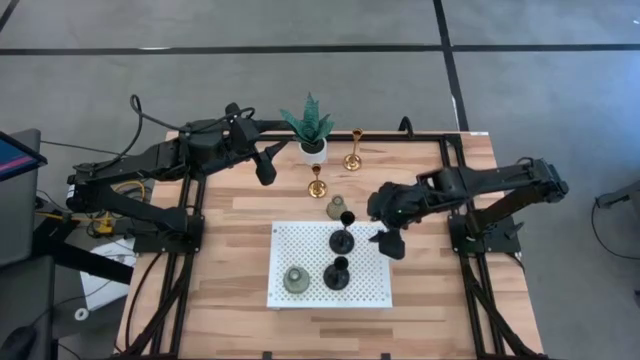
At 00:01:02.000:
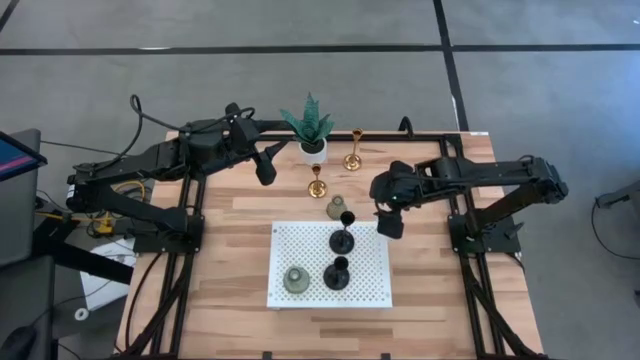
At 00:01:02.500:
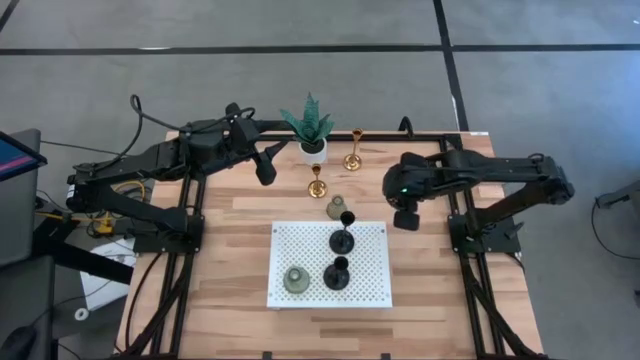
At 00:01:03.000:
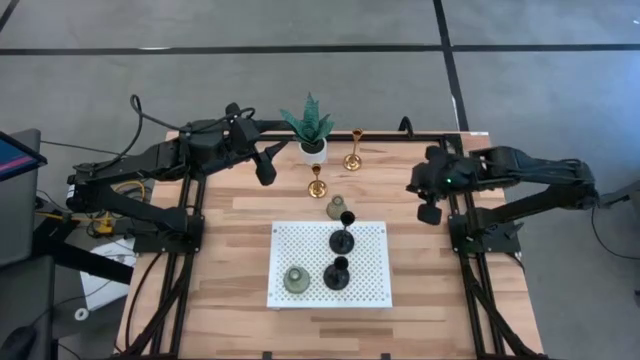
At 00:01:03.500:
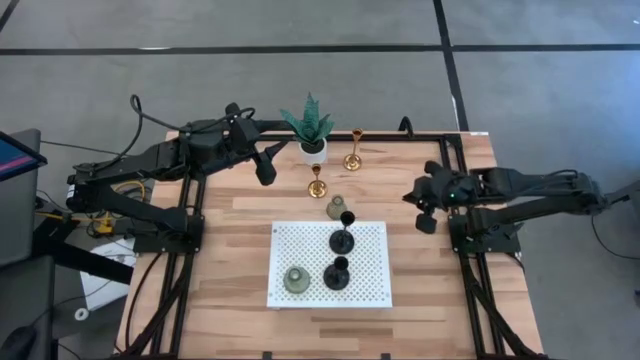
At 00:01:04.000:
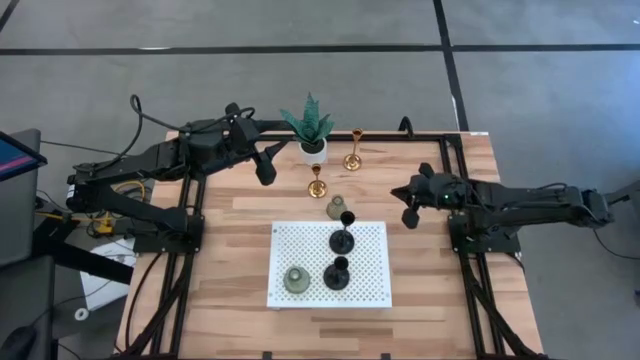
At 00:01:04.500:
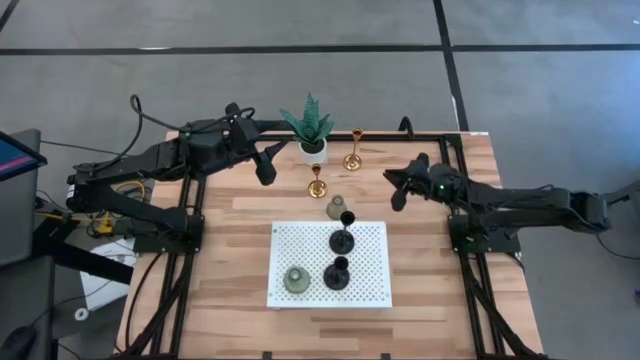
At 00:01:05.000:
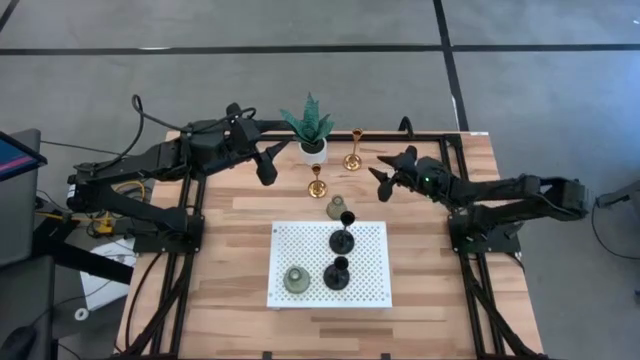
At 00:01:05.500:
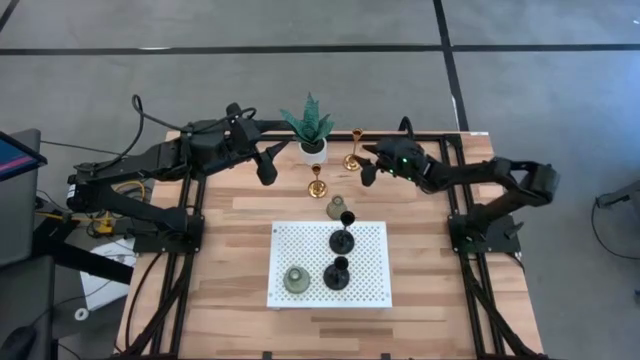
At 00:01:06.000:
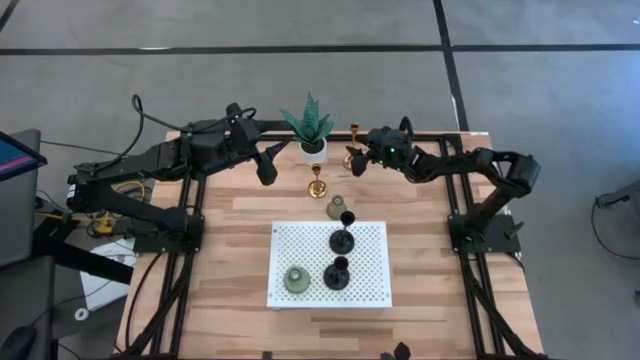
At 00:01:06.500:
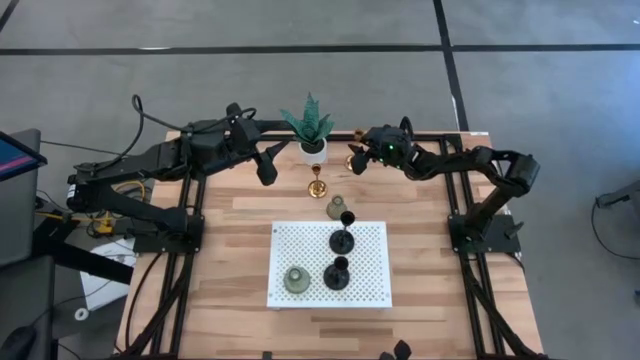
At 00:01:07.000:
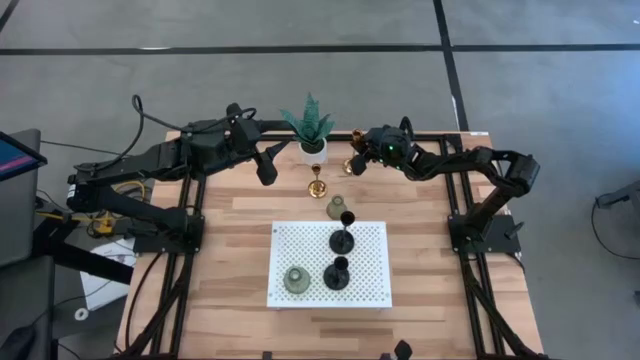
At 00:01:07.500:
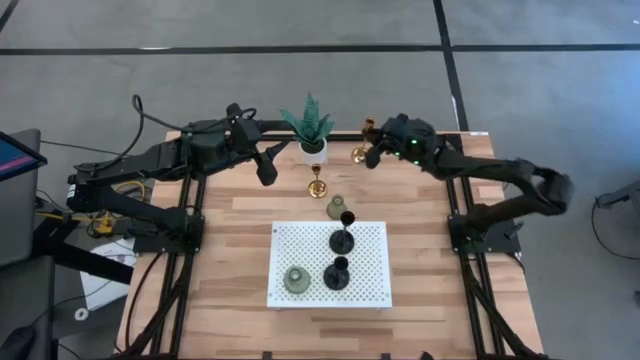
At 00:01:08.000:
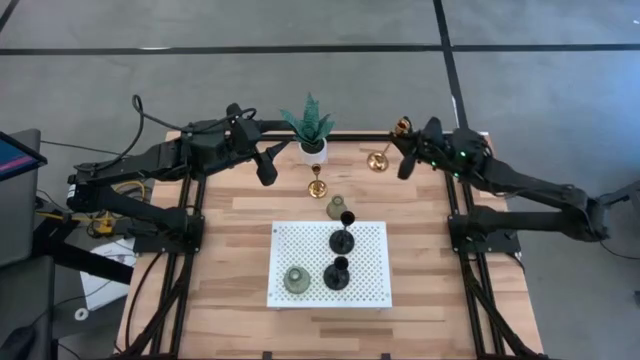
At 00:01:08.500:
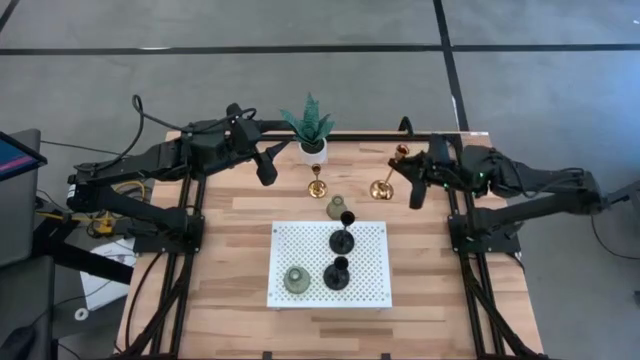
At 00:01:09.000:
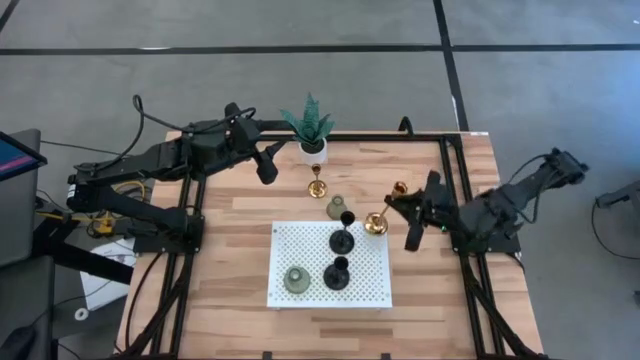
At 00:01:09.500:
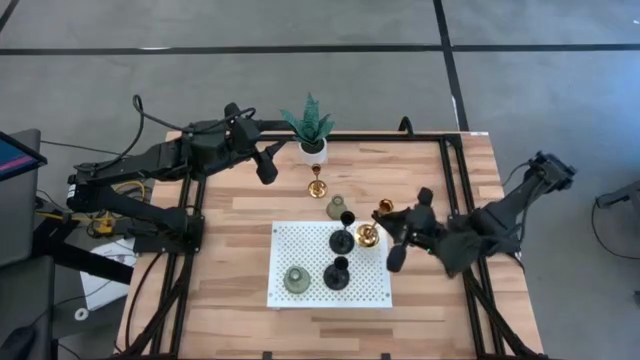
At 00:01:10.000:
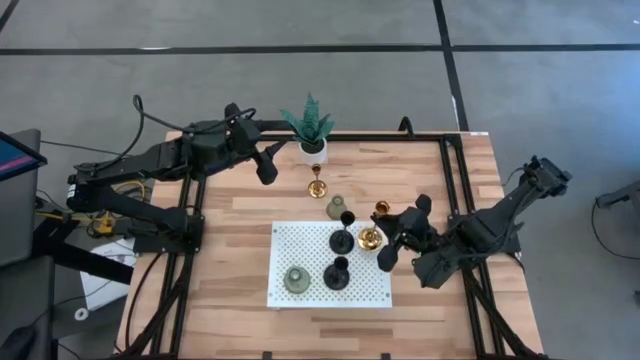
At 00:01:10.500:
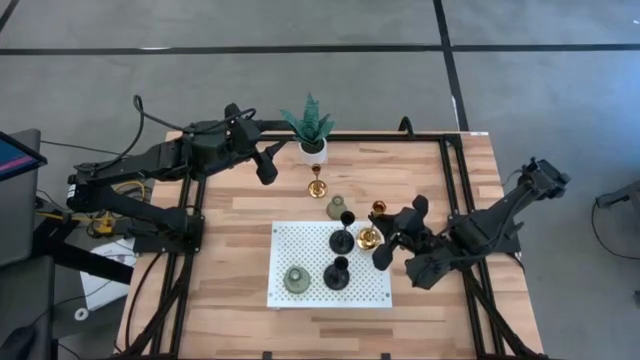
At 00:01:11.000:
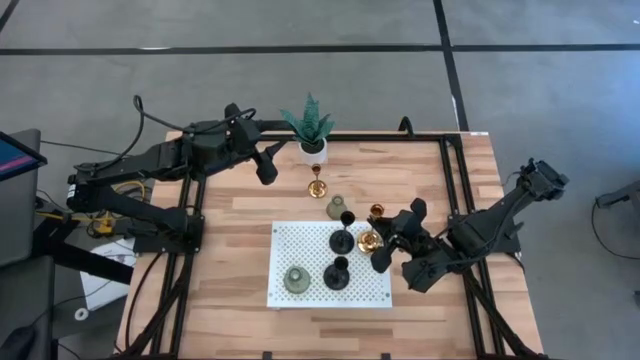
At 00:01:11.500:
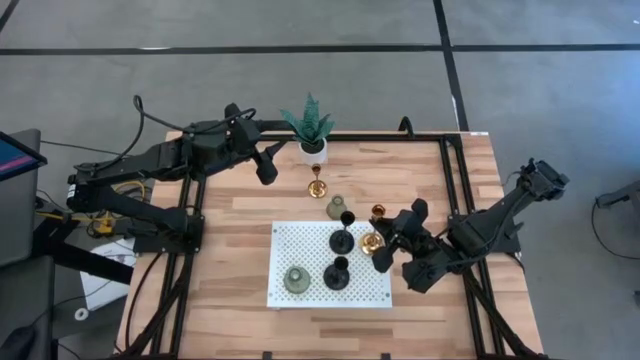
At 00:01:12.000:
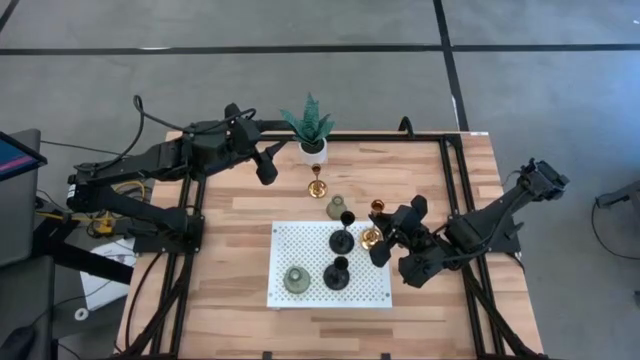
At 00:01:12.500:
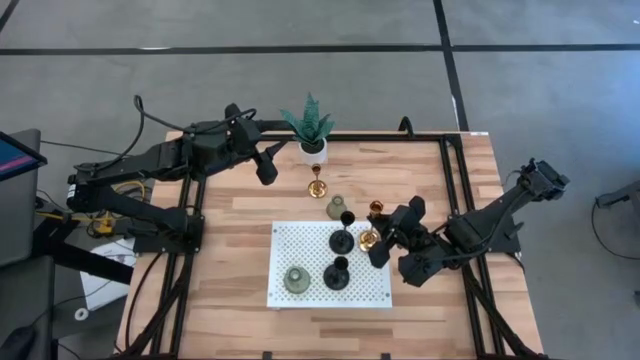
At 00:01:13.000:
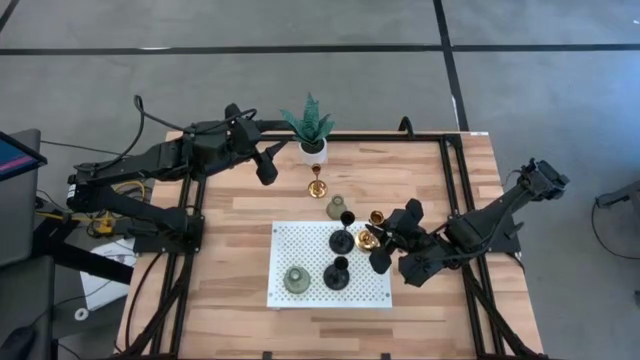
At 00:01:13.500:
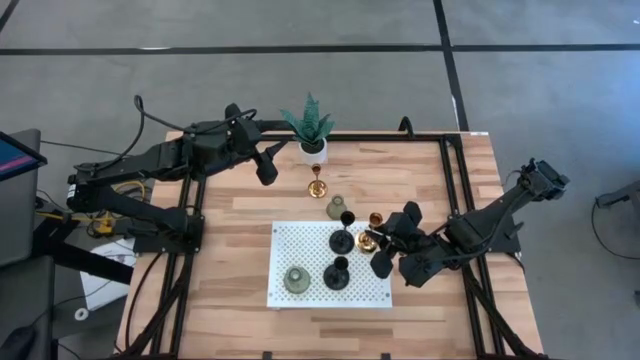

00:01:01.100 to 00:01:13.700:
Task: Pick & Place candle stick holders
Put the top gold candle holder on the shelf

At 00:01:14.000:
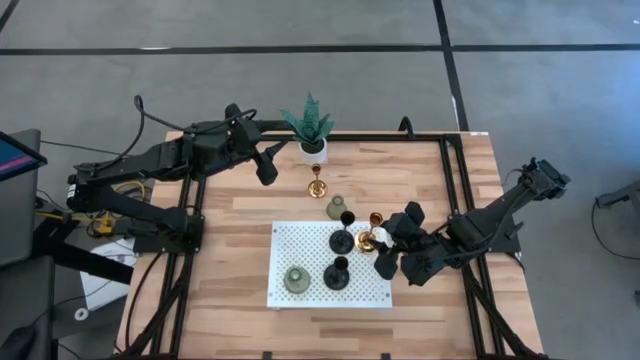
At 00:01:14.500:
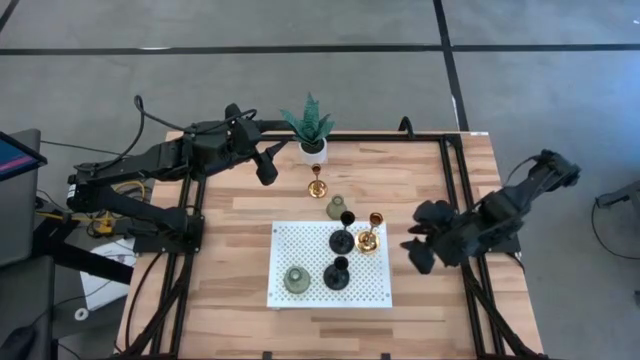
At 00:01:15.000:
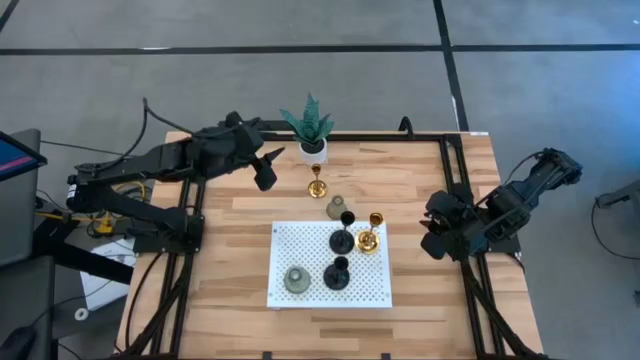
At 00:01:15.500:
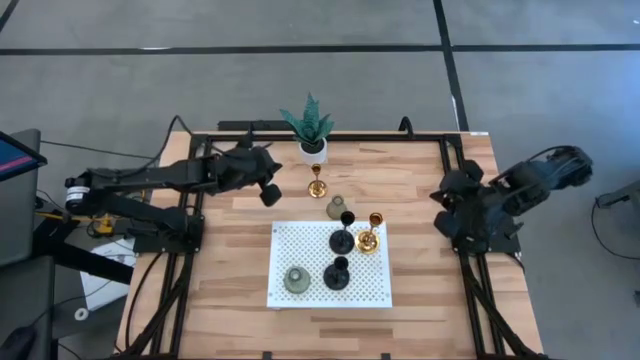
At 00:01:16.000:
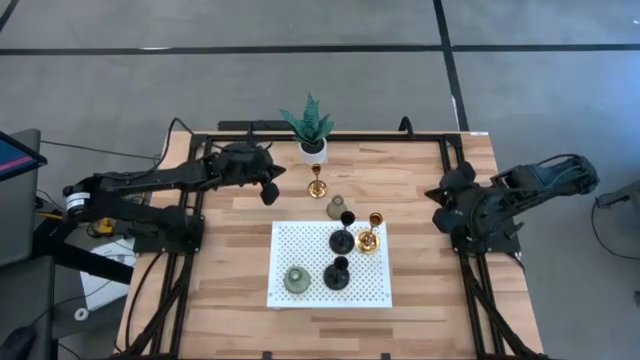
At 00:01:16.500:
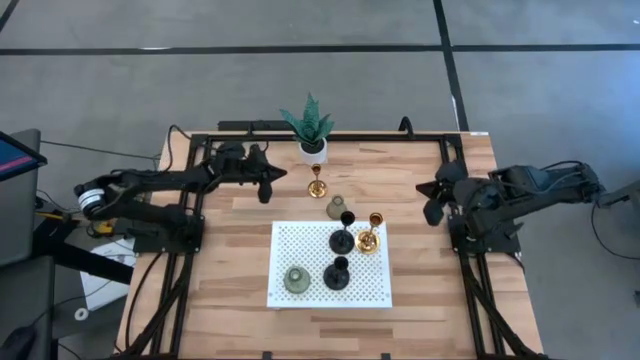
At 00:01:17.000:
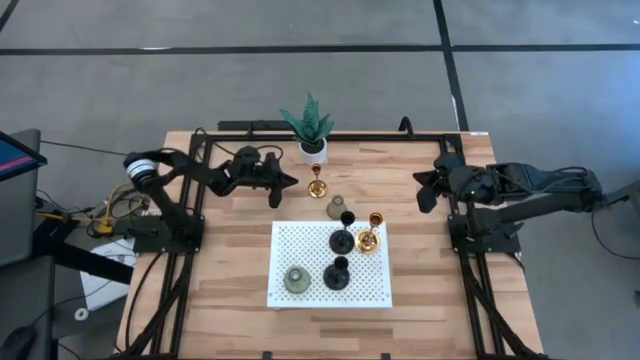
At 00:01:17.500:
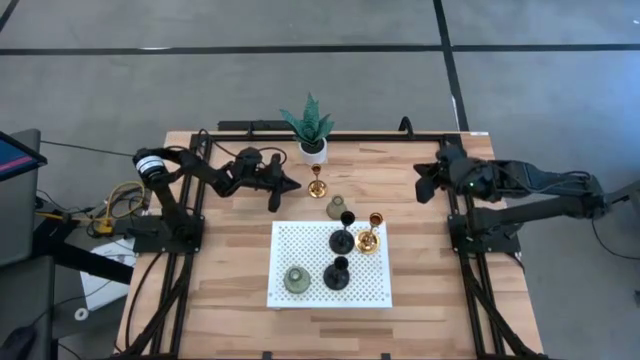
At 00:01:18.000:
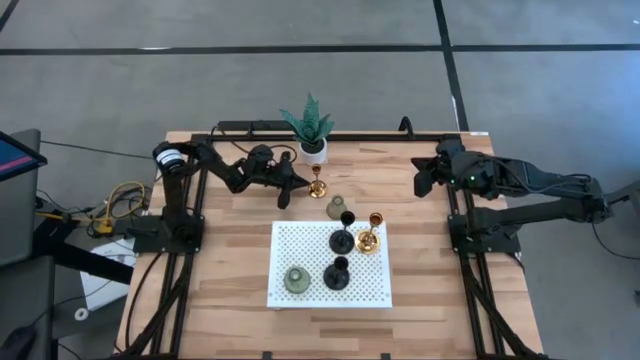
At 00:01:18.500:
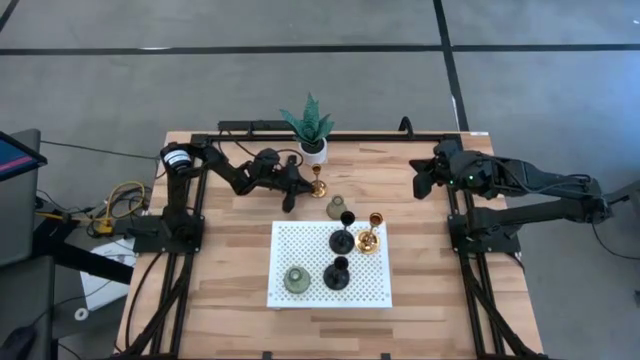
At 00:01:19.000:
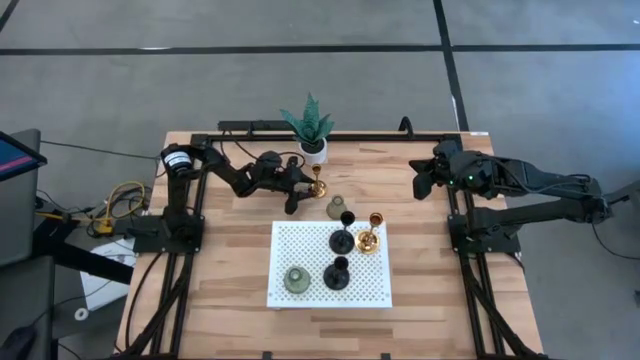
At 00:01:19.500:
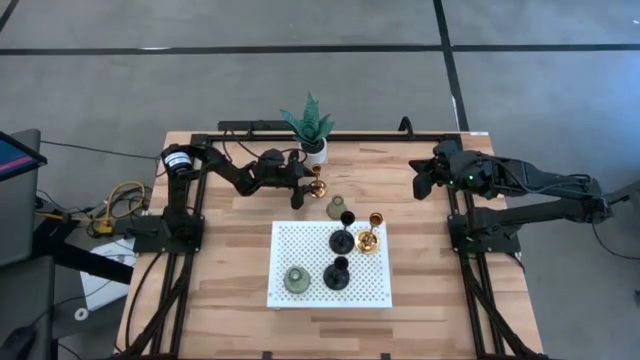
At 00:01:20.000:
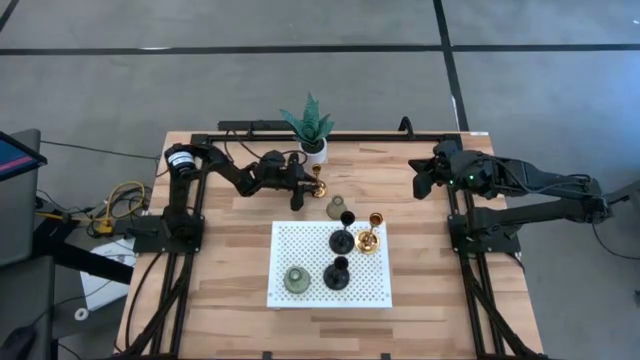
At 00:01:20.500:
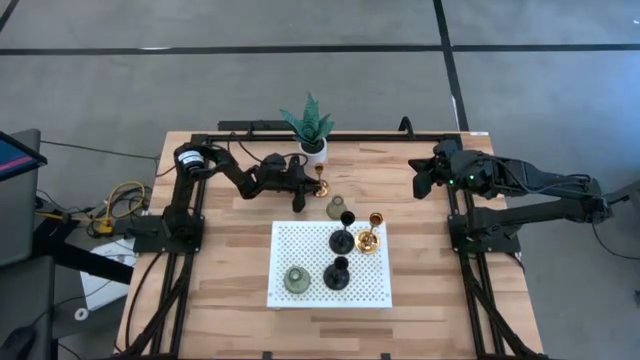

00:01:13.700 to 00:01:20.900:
Align the gold candle holder with the other gold candle holder on the shelf
